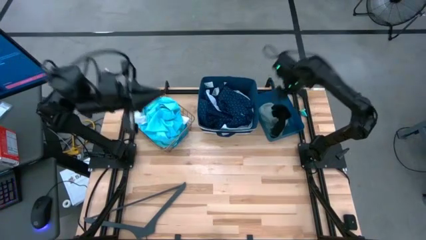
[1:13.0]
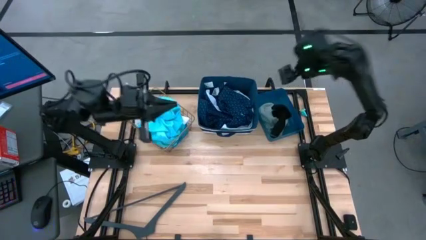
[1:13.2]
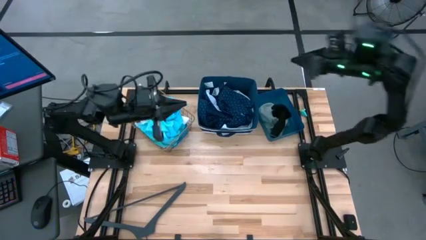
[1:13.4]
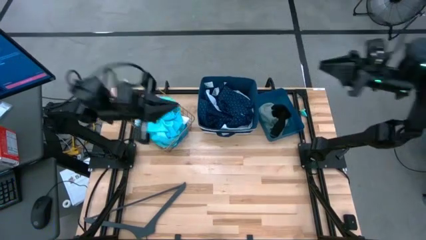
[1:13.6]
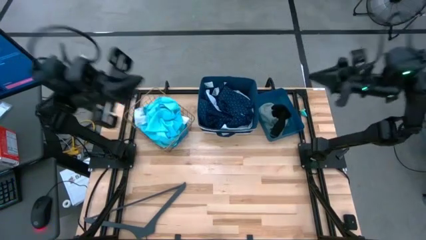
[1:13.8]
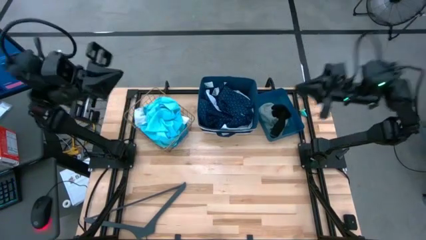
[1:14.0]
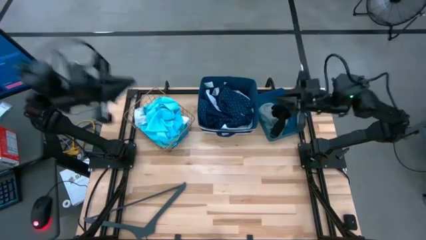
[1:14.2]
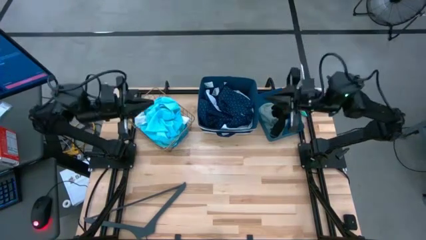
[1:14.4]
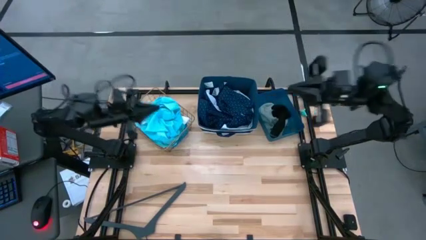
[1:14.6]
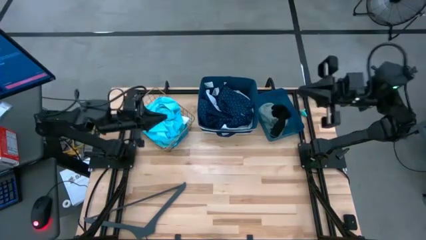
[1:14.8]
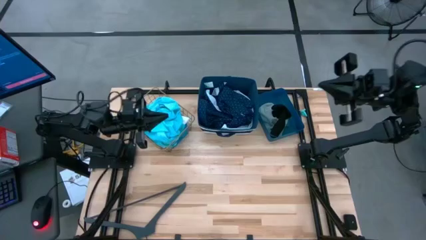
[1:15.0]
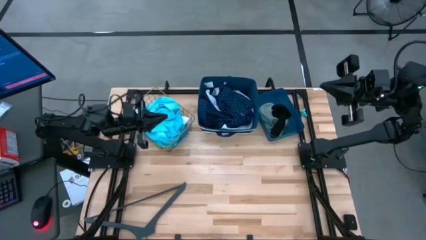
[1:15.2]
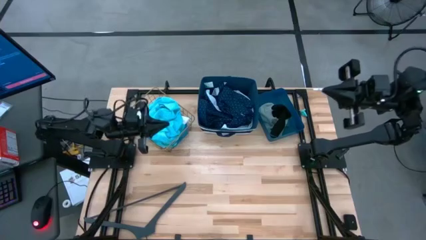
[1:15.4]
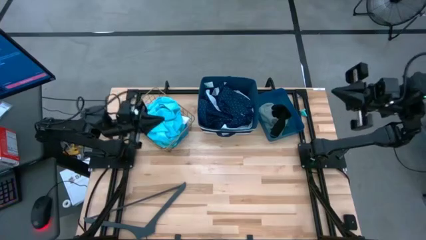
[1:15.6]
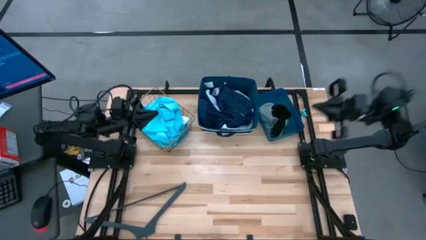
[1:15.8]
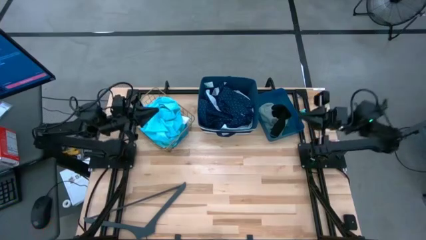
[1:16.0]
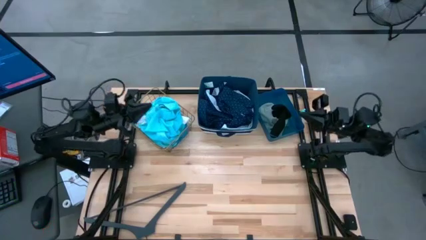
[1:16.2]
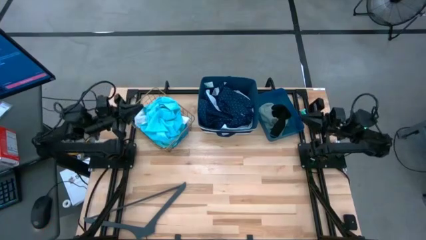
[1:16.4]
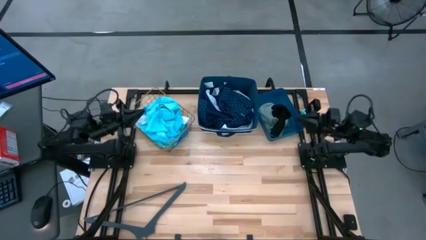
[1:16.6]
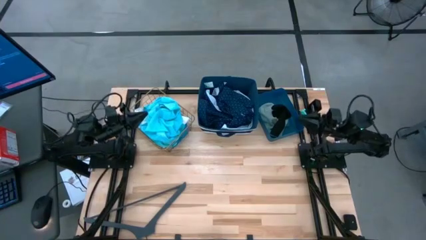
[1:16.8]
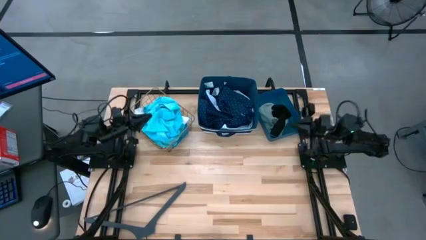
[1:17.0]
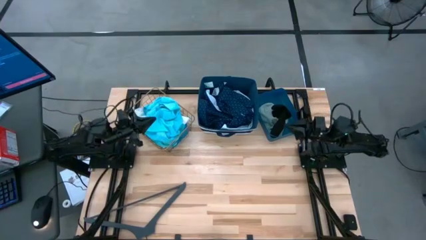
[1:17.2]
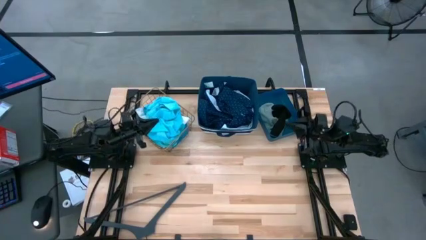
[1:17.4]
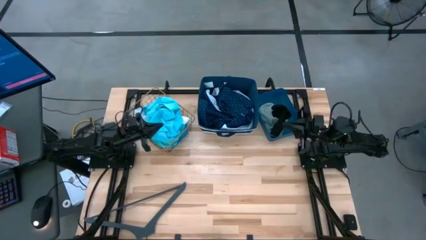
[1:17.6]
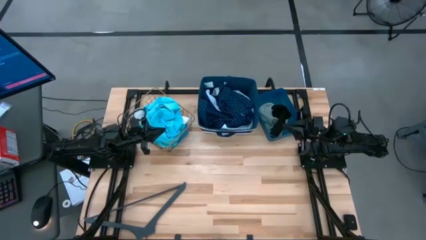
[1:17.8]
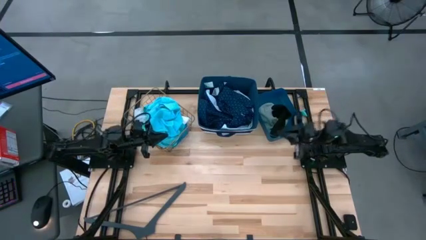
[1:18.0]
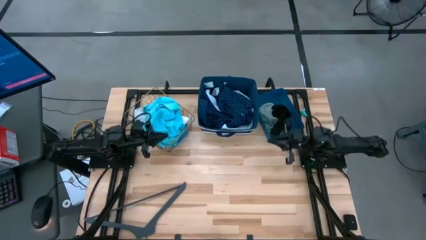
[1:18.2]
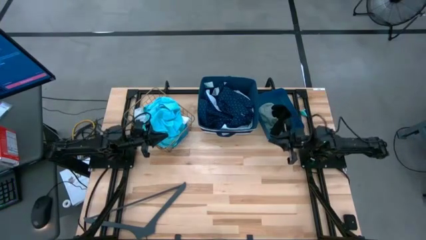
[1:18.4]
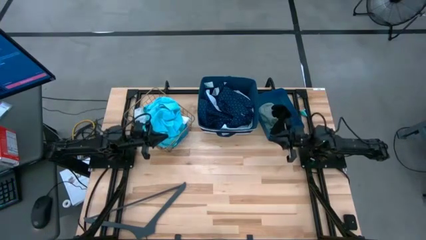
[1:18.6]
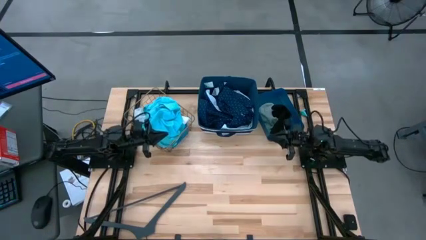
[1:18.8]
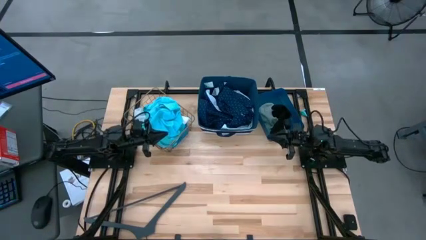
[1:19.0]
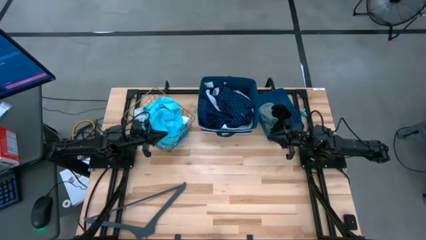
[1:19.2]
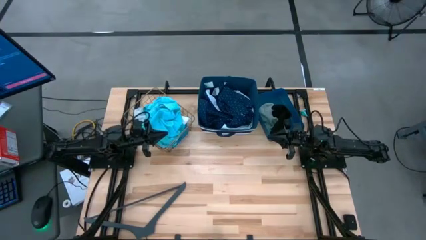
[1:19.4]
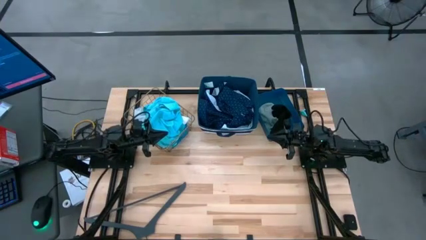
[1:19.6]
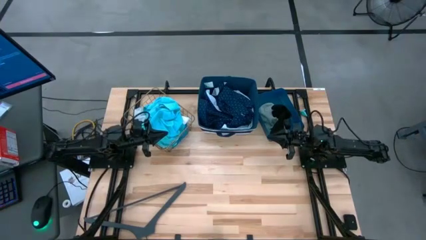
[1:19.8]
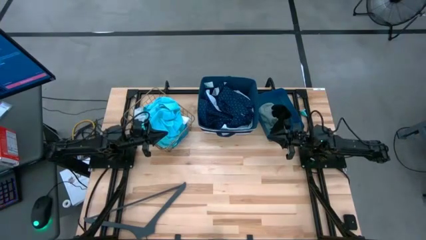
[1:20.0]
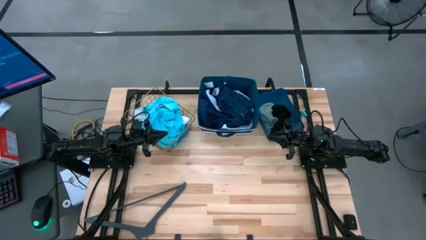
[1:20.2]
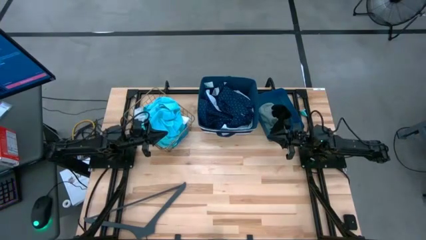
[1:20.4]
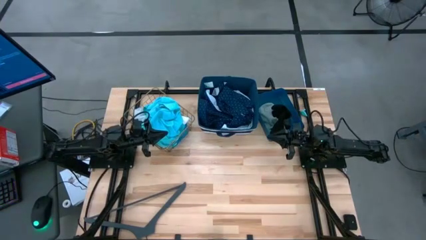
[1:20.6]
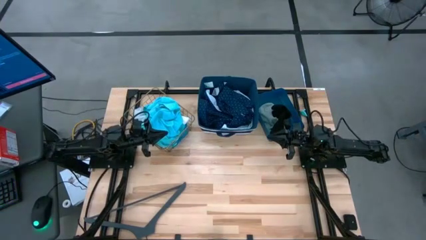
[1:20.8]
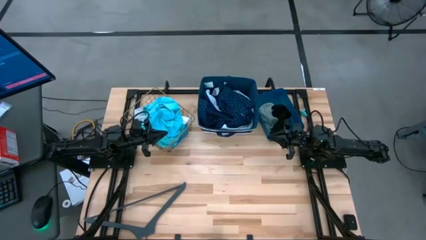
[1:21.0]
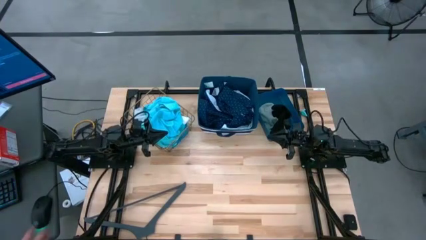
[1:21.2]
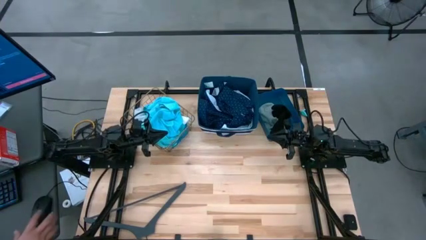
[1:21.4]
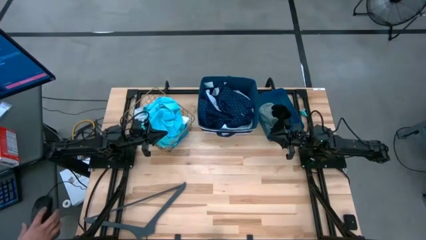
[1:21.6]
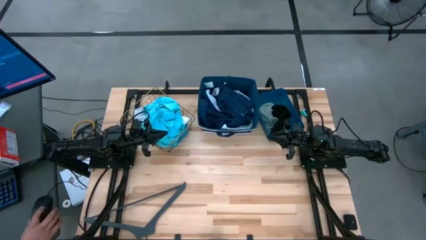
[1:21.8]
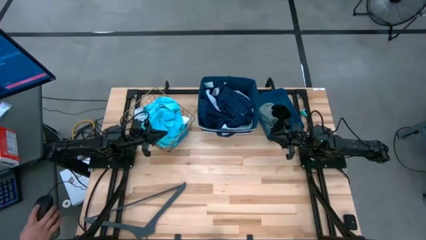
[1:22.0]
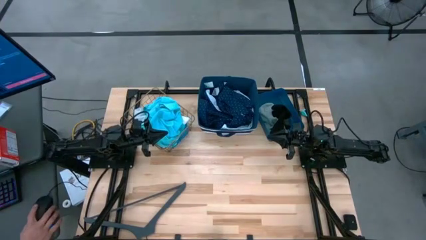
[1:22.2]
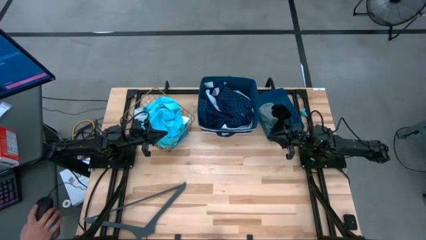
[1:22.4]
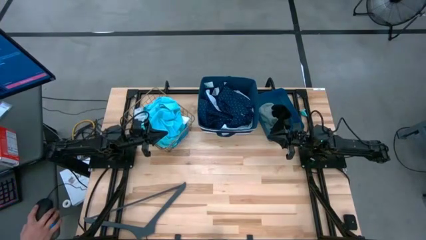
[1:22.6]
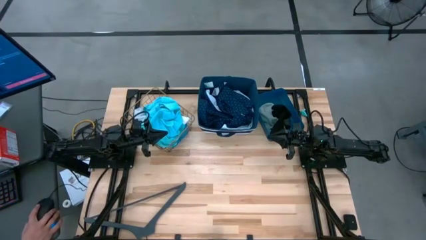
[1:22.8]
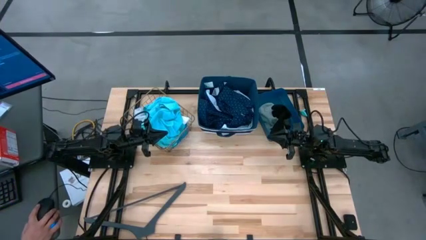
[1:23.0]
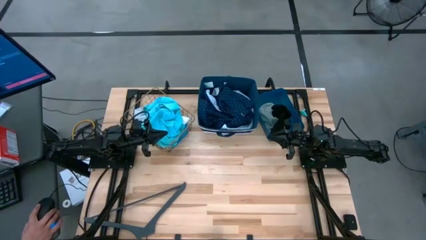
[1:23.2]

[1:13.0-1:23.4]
Task: Pick & Place Cloths
Return to Home Position

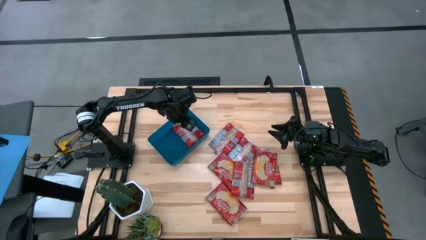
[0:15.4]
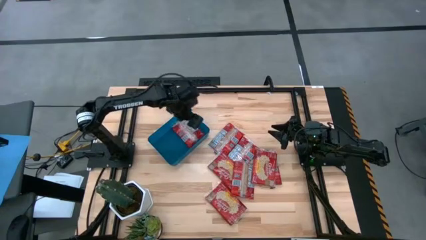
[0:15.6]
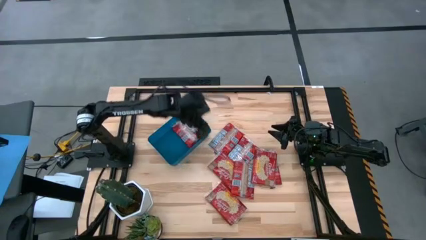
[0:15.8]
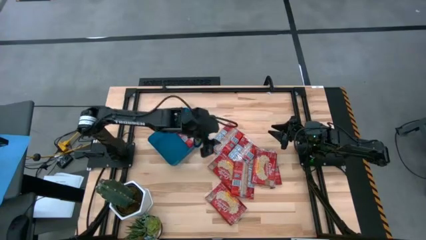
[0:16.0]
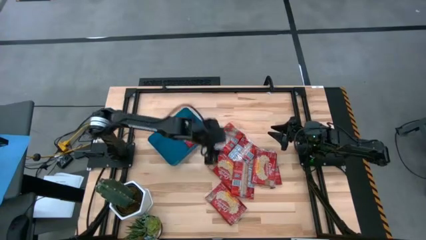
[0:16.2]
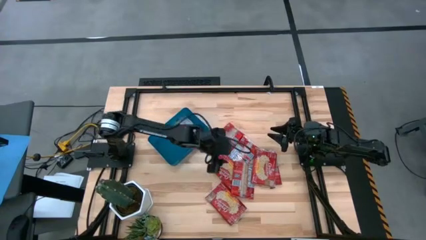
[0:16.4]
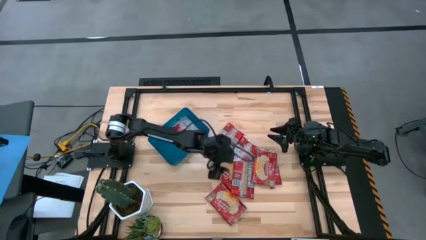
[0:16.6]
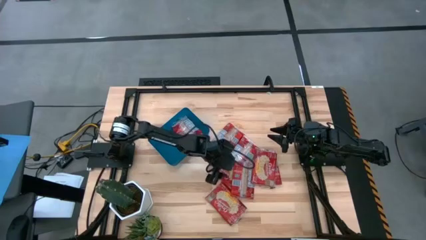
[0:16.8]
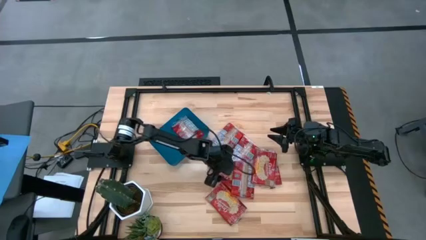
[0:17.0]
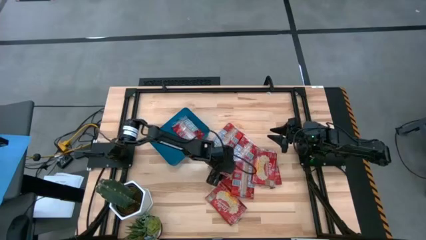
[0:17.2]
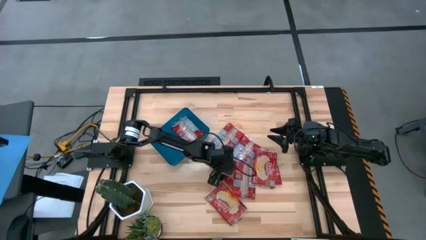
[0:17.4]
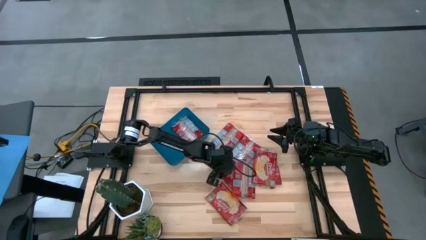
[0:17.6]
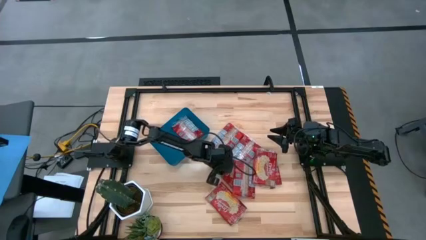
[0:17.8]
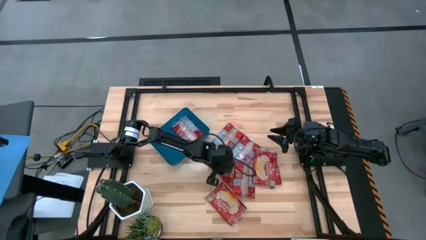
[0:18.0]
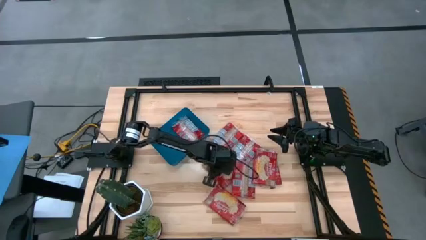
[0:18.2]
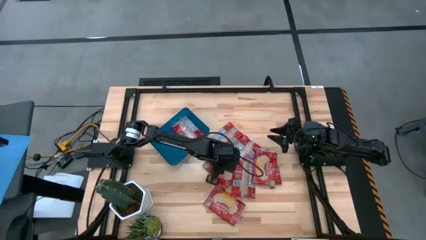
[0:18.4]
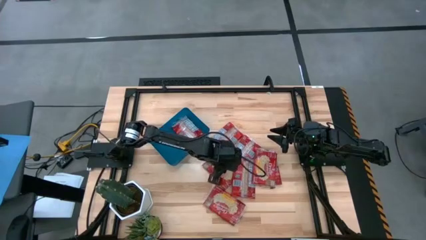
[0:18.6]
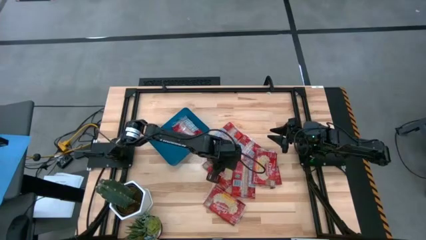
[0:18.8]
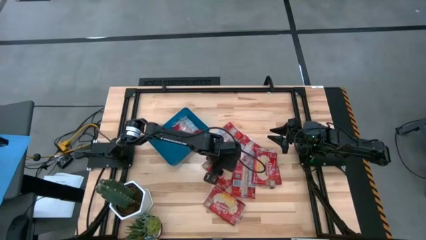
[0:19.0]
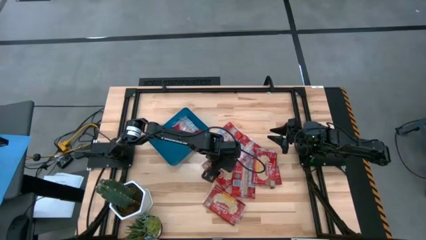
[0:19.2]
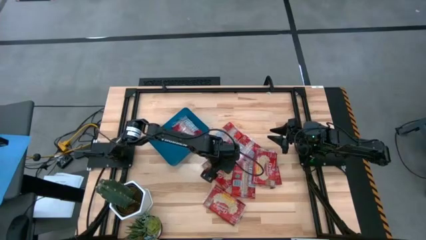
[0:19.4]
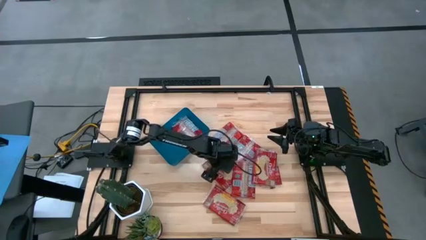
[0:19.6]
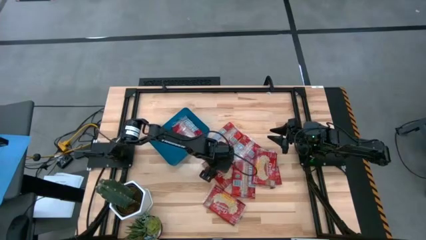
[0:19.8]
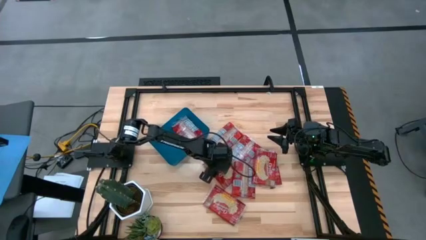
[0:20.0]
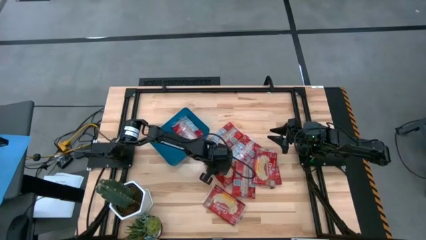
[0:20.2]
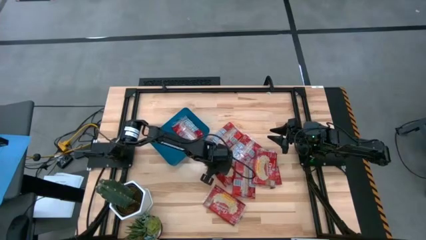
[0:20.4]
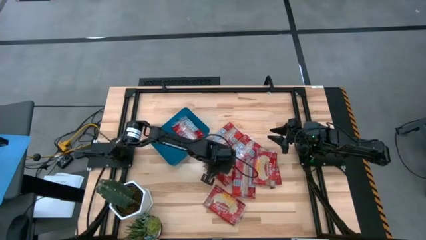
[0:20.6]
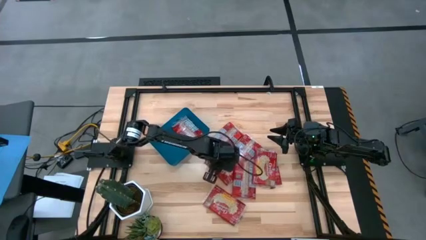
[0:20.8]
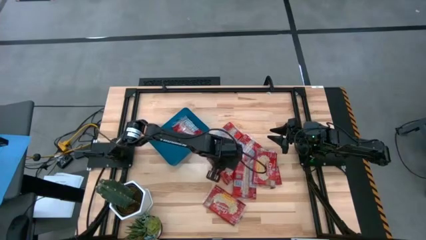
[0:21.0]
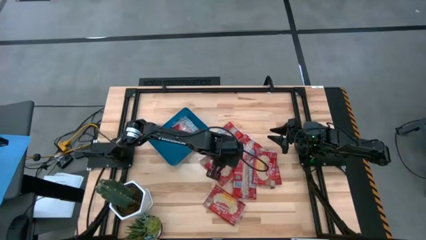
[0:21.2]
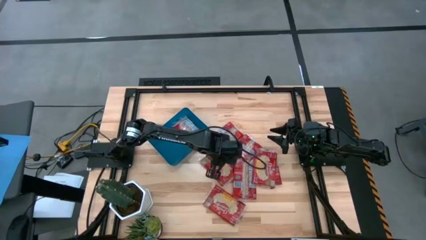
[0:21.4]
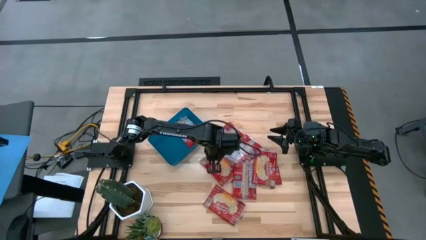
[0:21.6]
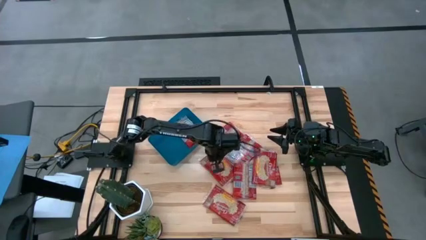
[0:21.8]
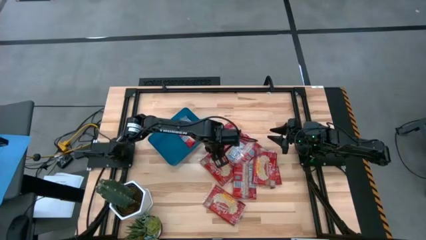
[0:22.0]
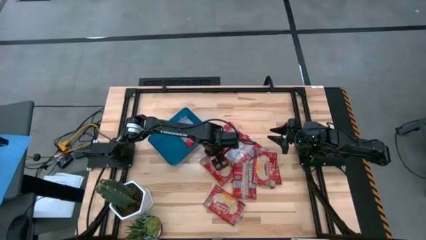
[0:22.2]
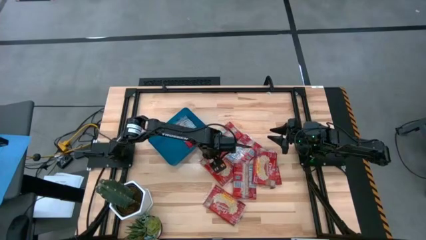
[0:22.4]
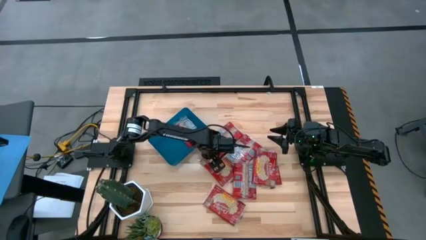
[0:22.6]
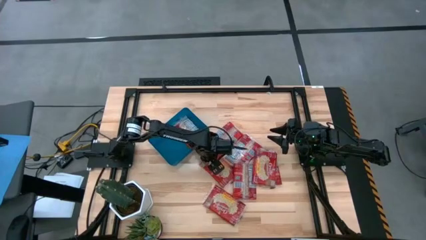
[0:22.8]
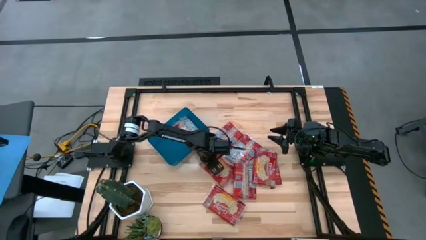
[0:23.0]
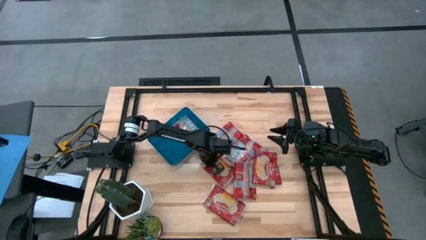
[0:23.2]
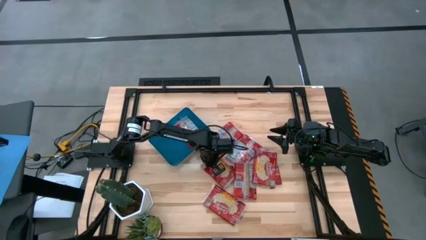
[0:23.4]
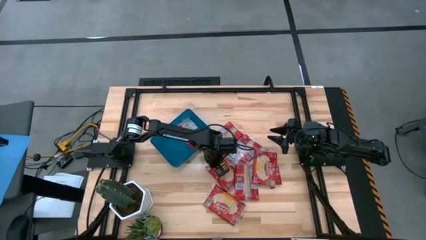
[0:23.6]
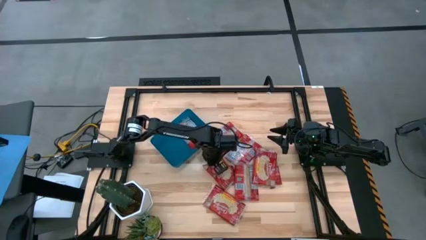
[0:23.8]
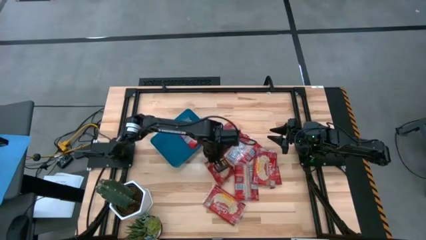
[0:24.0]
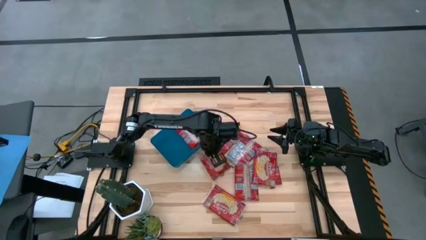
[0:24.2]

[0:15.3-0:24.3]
Task: Sort popcorn bags into baskets
Put the red popcorn bag into the blue bin
